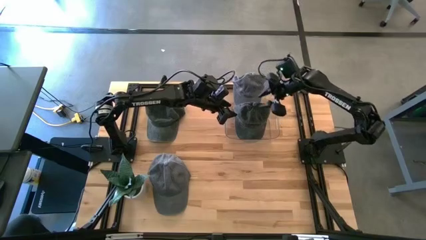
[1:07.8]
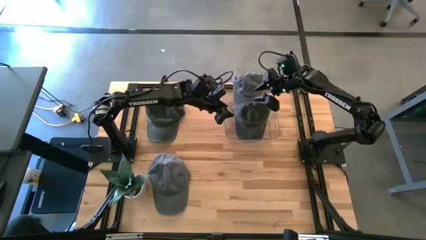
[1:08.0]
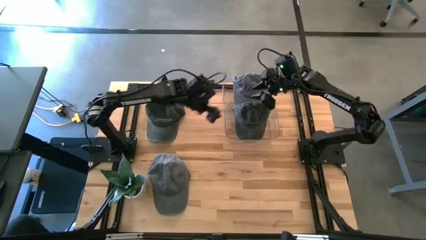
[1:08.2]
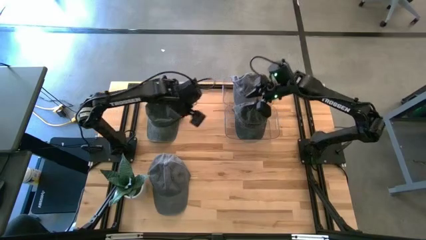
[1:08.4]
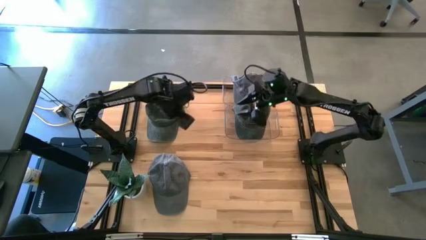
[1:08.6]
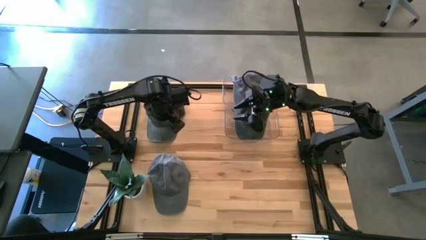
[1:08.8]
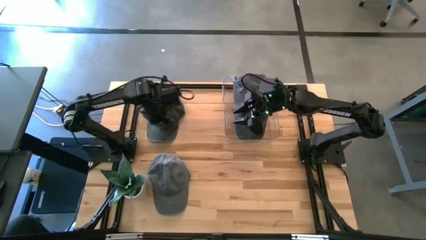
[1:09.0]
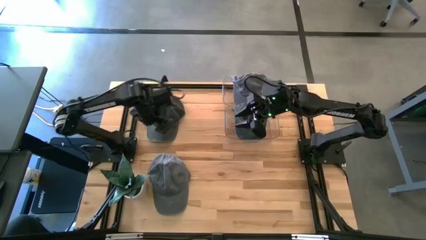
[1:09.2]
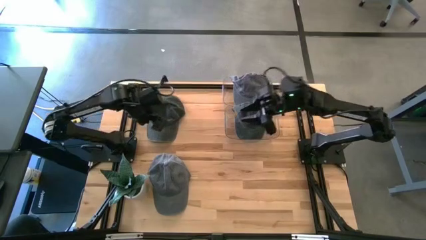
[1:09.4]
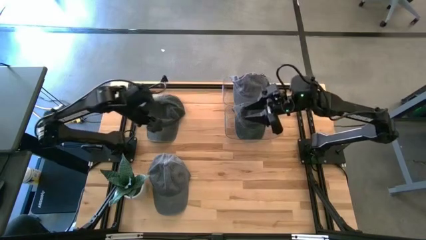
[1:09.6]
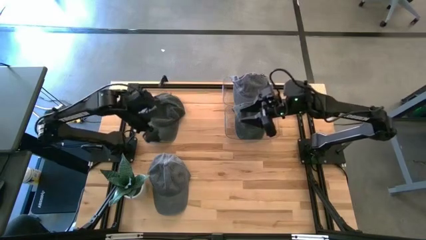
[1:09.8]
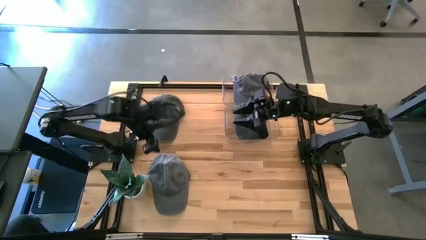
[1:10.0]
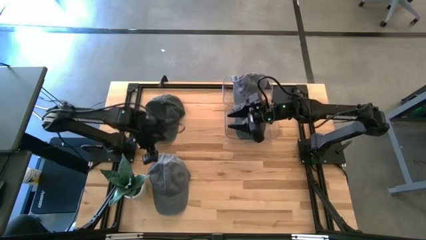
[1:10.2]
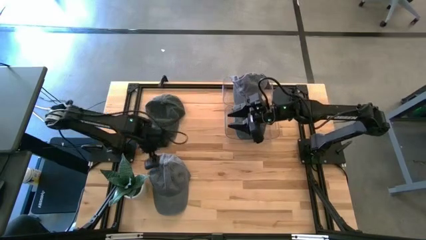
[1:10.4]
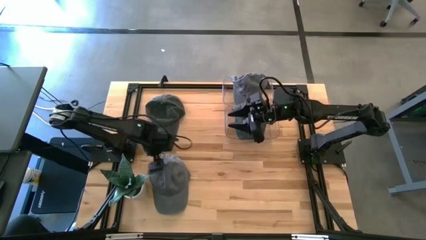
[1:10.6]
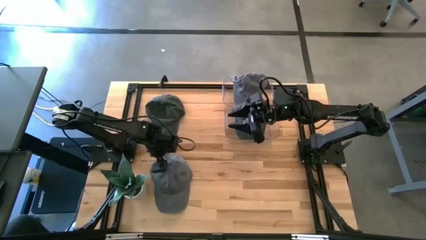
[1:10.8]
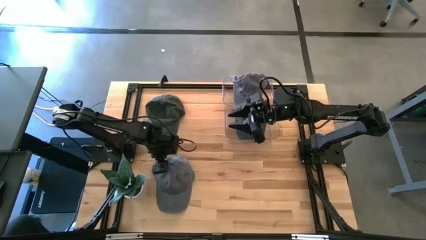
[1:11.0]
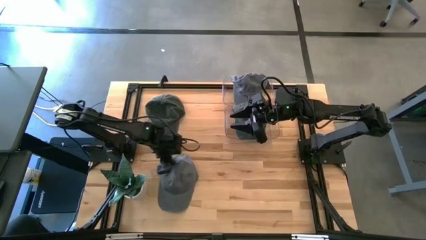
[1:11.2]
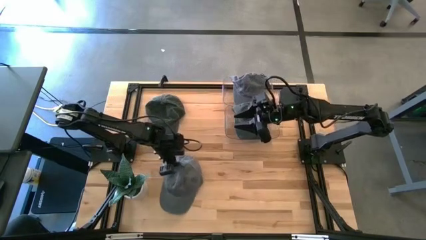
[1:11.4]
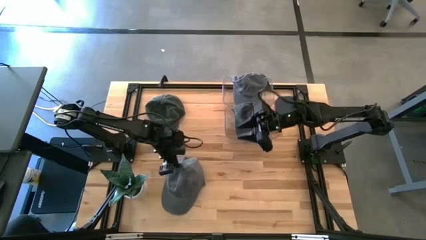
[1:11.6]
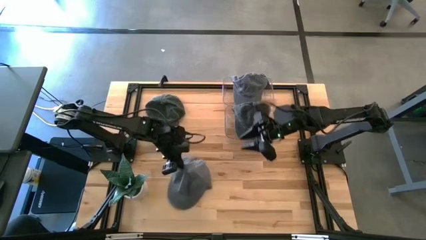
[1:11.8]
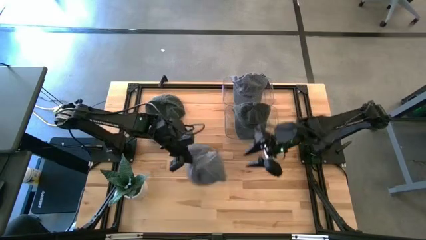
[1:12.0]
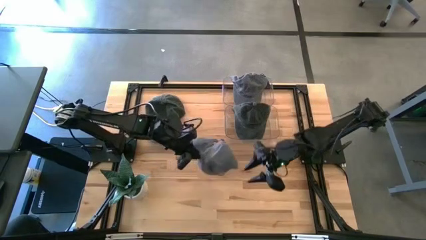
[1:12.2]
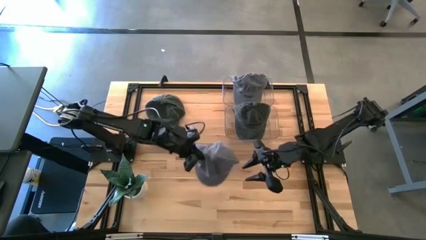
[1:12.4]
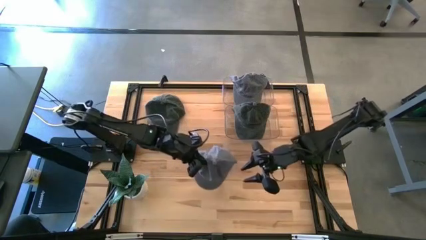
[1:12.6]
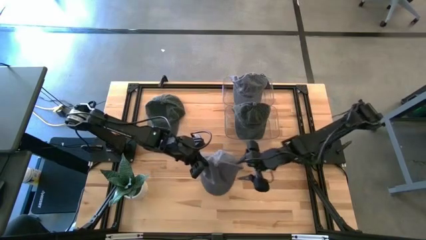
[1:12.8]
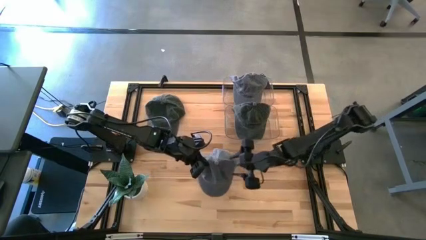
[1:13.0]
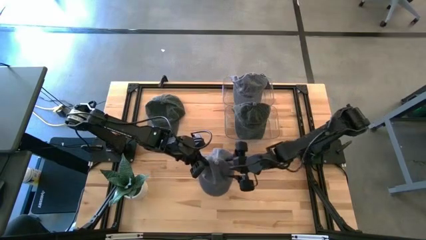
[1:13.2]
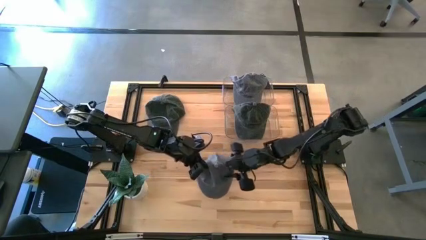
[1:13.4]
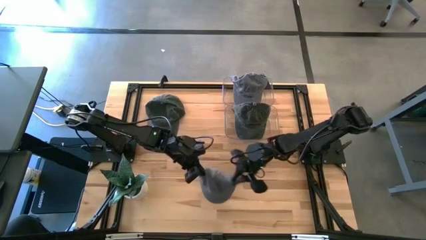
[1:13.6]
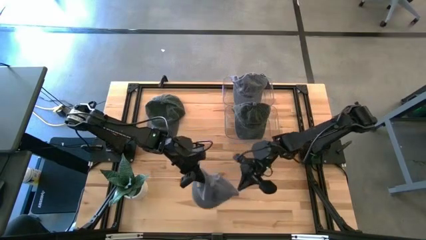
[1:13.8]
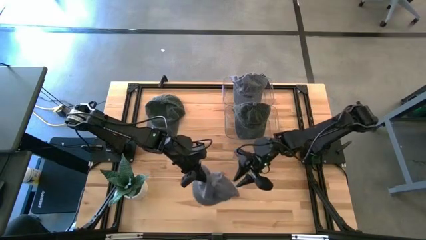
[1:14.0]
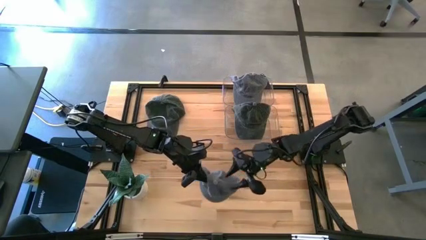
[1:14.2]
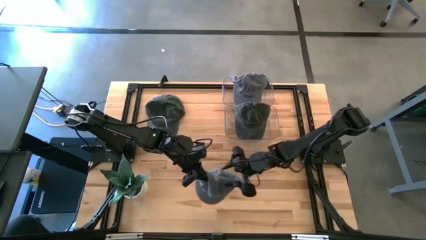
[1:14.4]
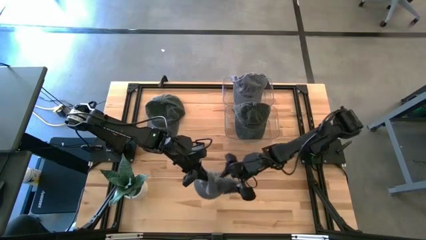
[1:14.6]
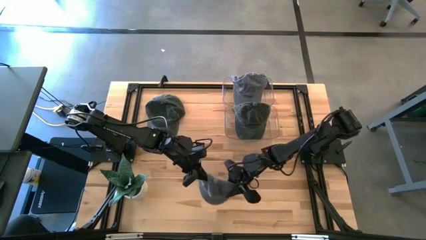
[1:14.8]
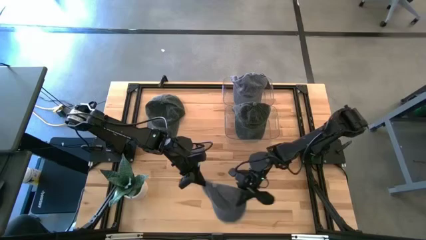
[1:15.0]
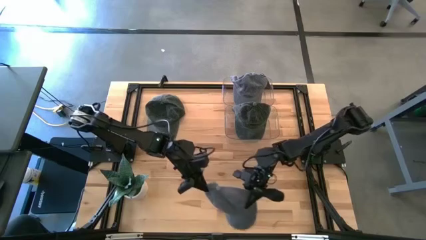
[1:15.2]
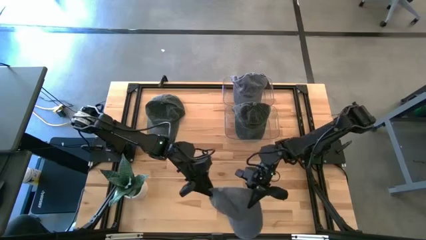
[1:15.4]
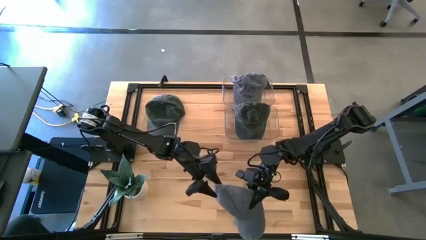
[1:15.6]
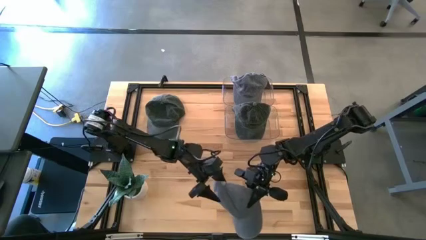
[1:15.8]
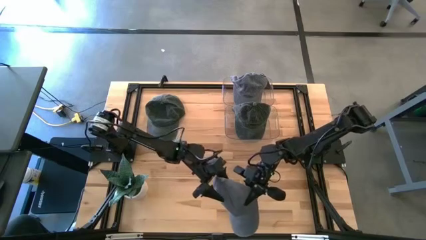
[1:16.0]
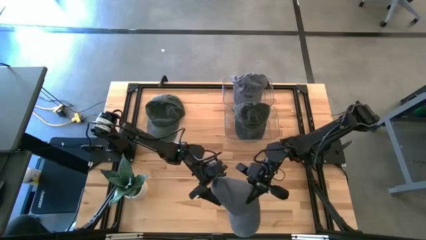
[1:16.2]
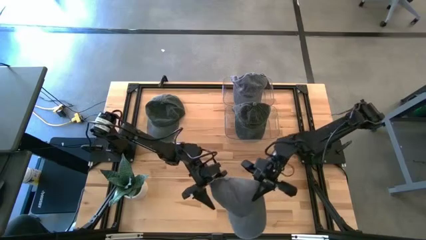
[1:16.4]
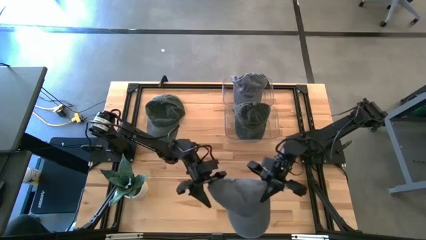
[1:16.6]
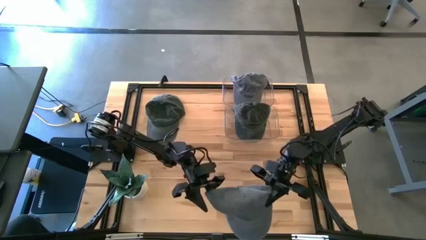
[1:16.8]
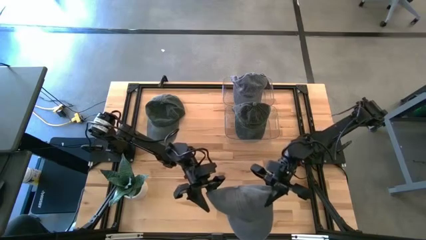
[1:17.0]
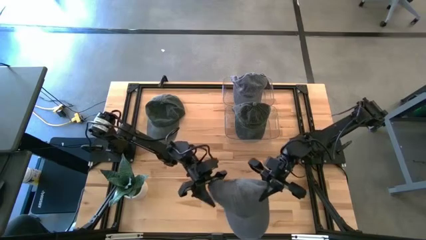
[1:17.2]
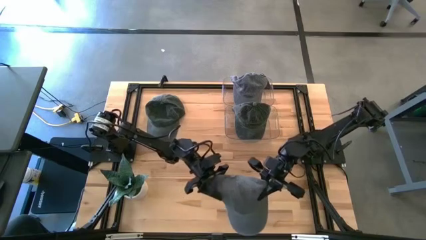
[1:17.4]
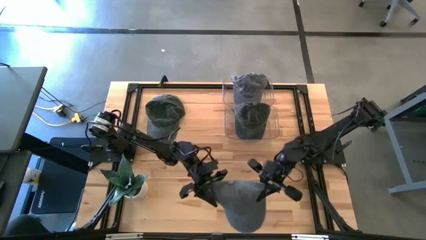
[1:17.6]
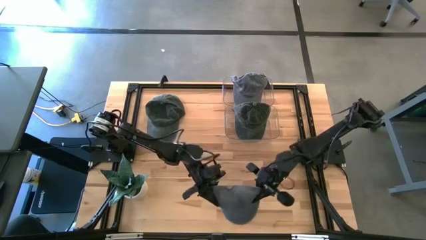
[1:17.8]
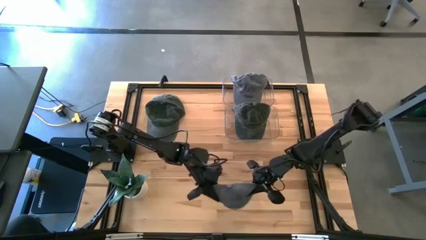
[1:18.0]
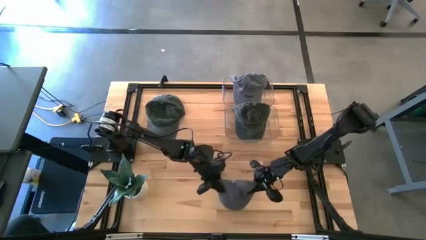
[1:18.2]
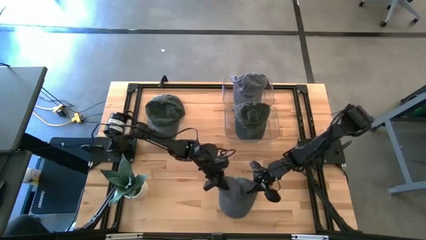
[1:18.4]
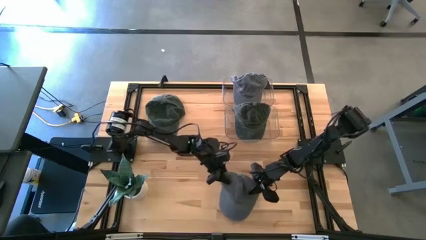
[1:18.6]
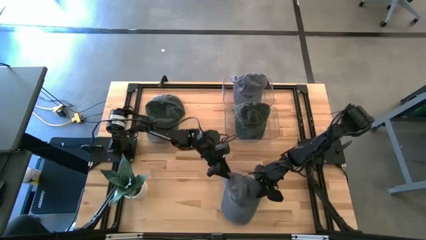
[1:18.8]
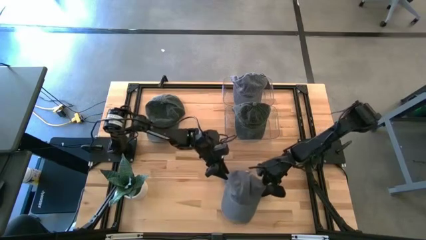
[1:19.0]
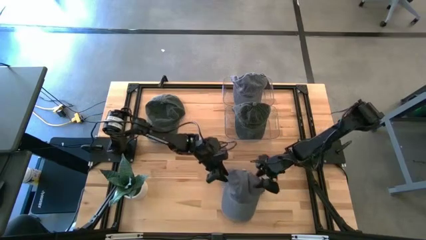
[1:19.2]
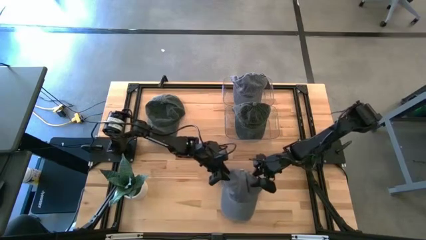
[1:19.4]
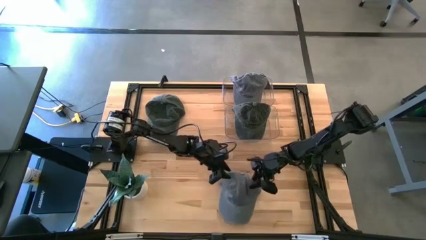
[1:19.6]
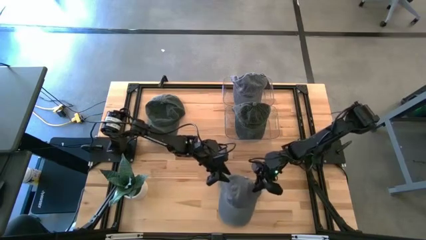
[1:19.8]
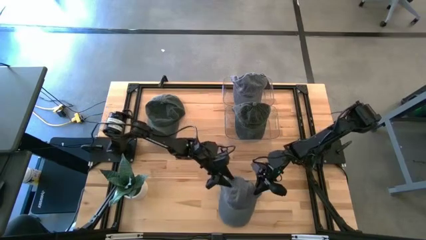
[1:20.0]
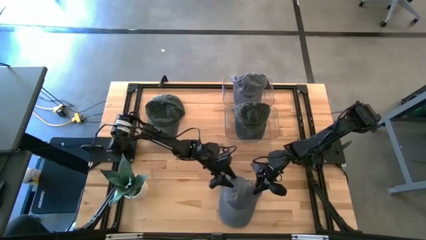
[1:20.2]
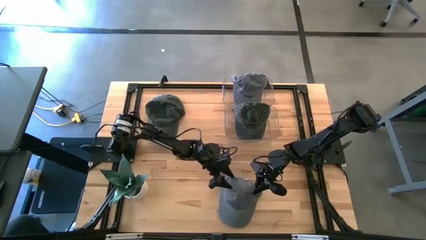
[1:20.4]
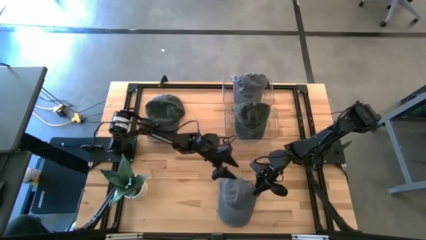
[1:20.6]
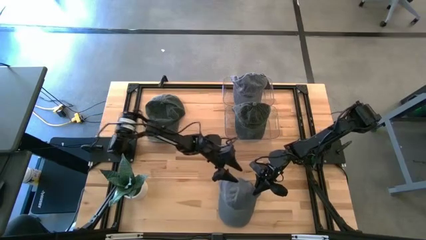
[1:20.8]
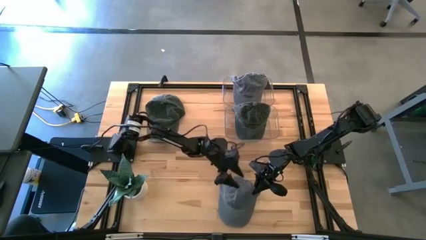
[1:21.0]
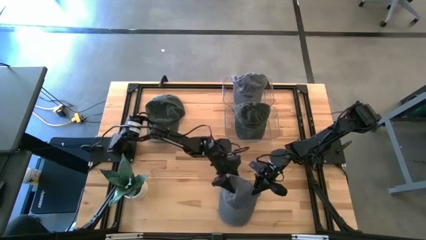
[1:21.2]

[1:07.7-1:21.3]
Task: Pick & Place hat
Put the gray cap into the top transparent bin

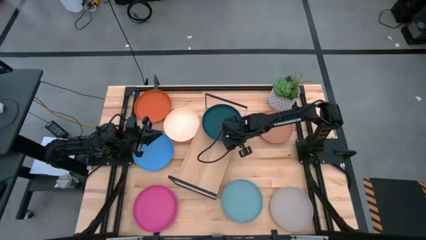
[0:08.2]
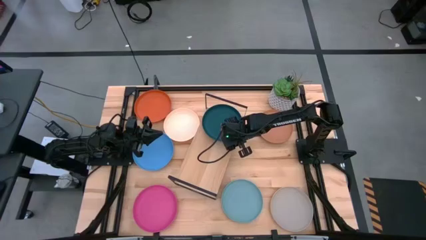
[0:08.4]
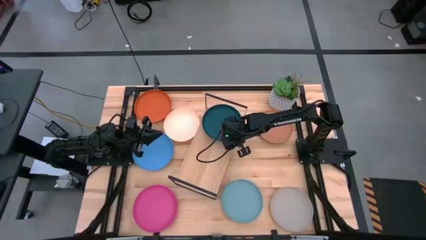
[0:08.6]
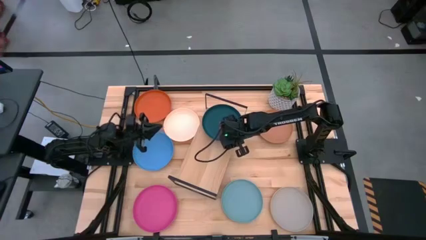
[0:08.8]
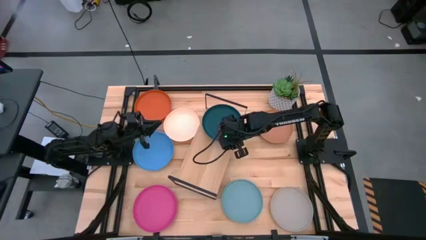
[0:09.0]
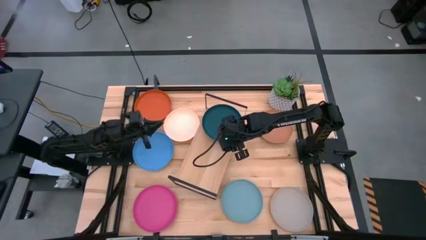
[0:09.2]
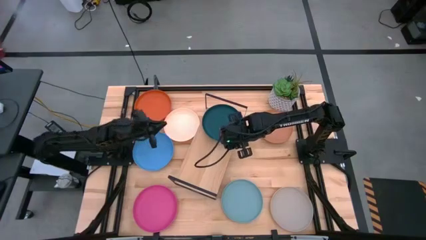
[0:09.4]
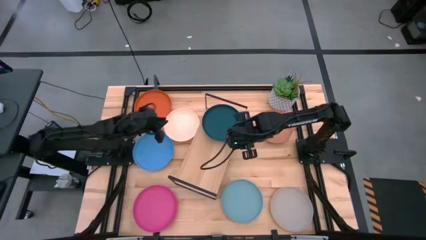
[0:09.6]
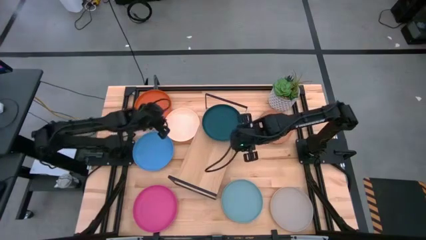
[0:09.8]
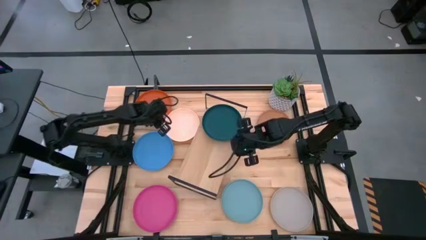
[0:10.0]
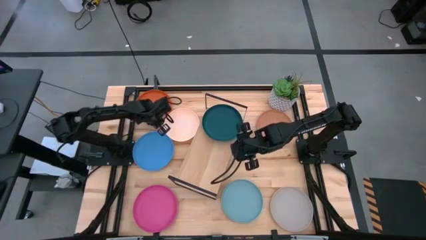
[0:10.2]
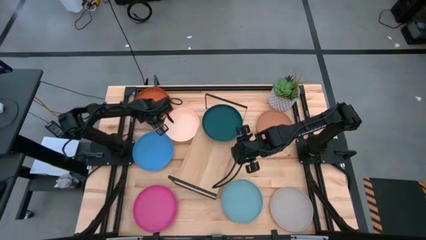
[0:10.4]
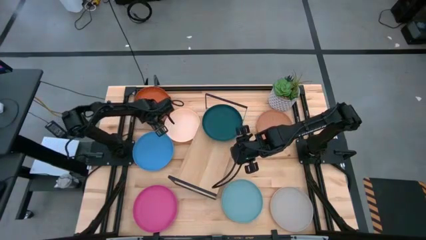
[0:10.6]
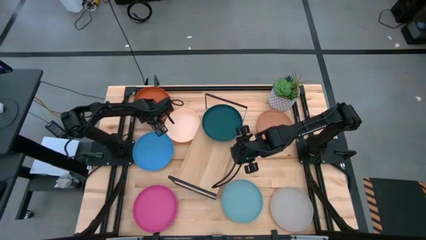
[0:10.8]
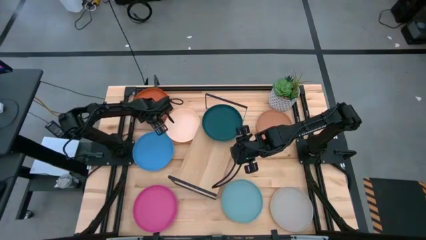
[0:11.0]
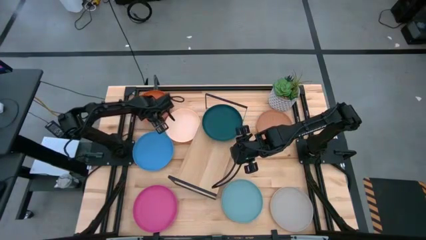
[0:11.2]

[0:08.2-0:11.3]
Task: Place and stack plates onto a shelf
Stack the orange plate on top of the dark green plate on the shelf
